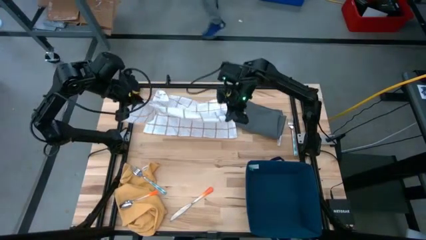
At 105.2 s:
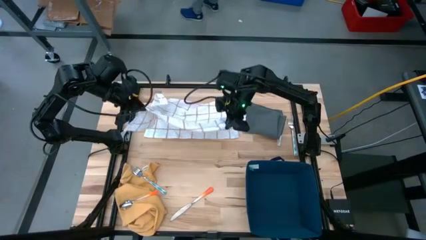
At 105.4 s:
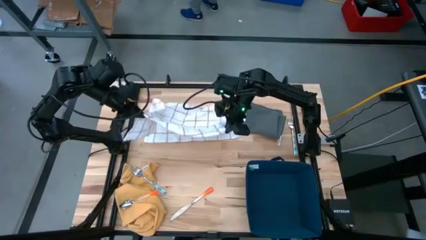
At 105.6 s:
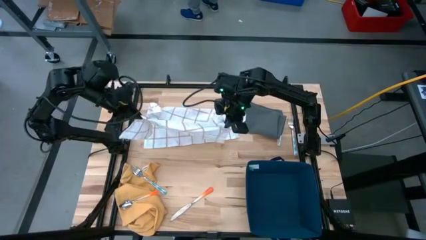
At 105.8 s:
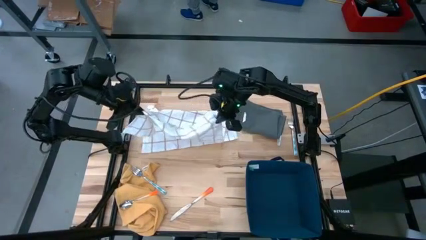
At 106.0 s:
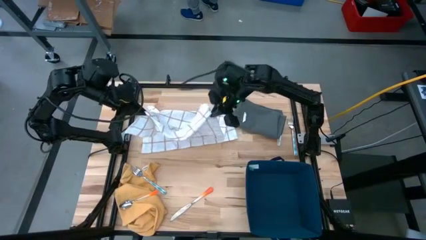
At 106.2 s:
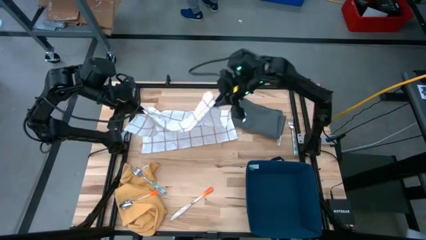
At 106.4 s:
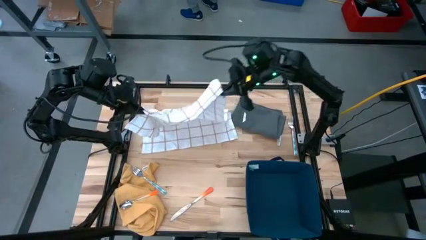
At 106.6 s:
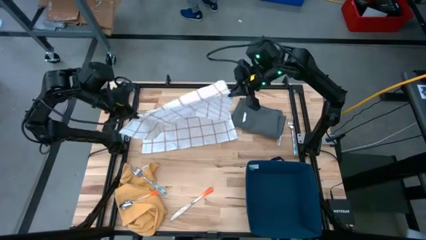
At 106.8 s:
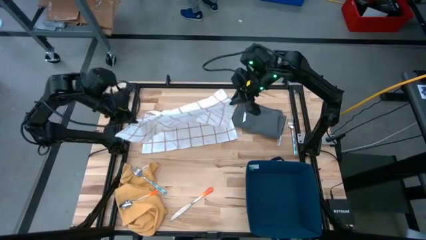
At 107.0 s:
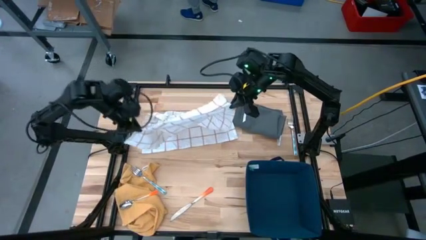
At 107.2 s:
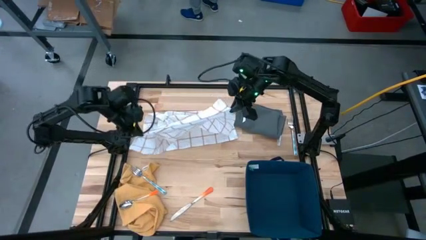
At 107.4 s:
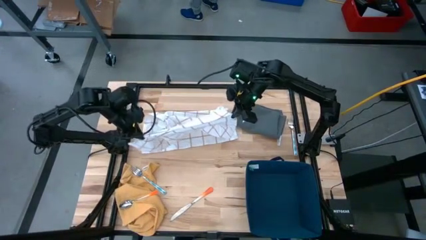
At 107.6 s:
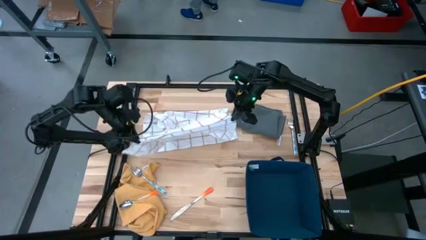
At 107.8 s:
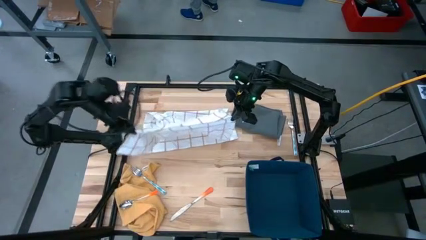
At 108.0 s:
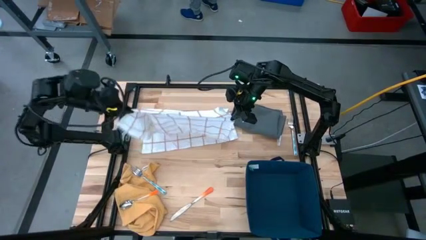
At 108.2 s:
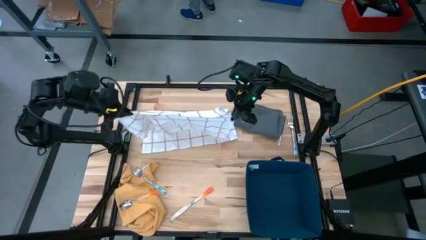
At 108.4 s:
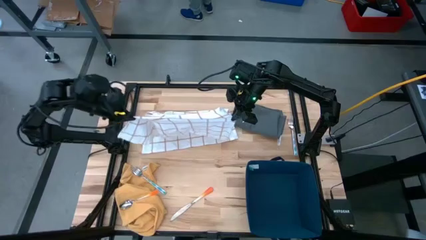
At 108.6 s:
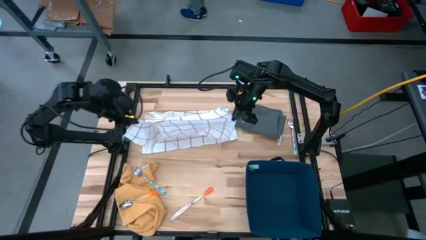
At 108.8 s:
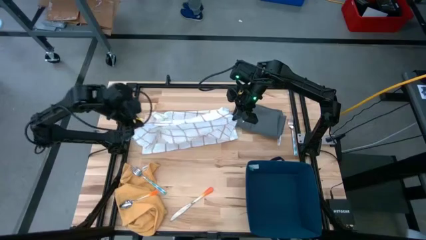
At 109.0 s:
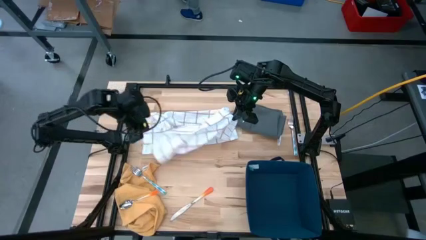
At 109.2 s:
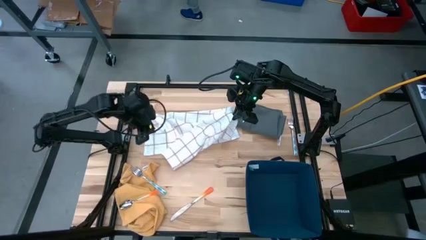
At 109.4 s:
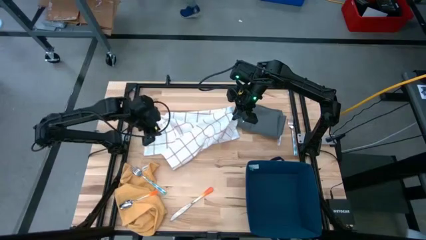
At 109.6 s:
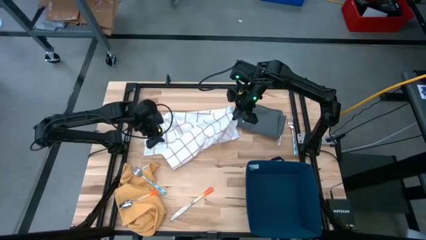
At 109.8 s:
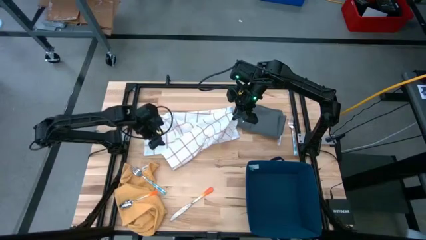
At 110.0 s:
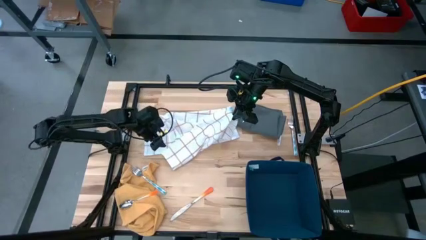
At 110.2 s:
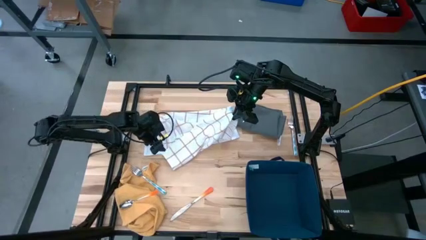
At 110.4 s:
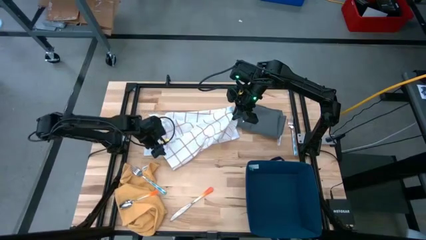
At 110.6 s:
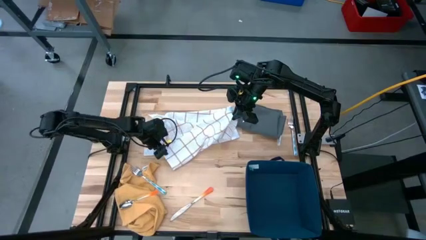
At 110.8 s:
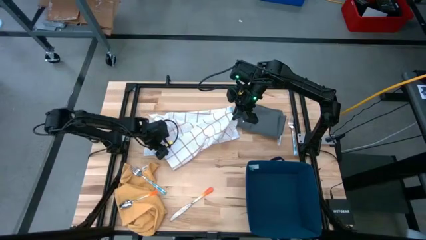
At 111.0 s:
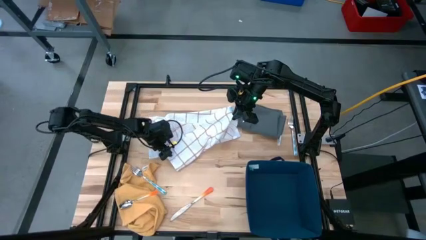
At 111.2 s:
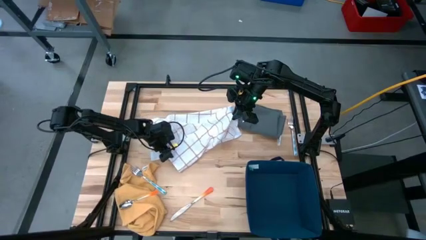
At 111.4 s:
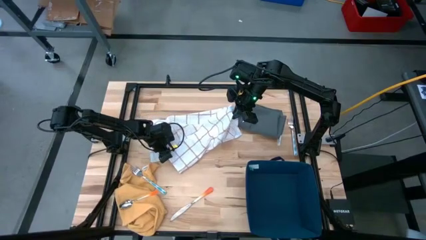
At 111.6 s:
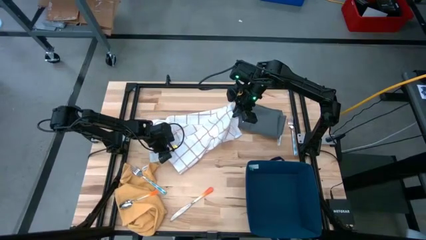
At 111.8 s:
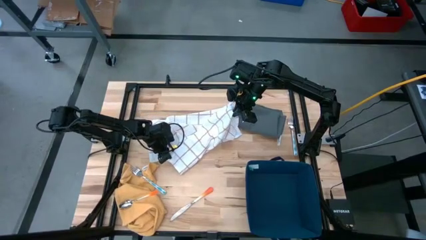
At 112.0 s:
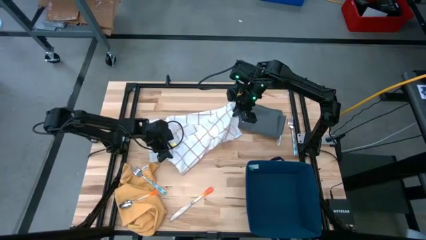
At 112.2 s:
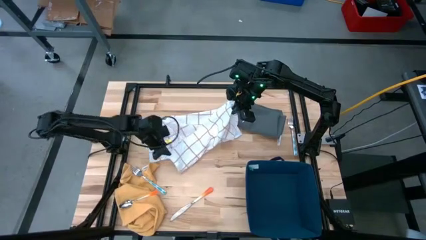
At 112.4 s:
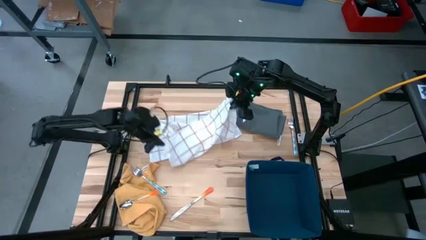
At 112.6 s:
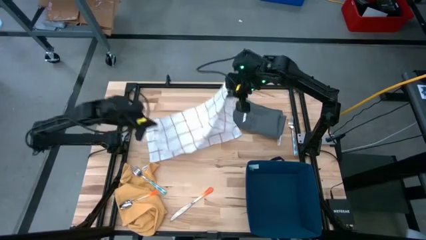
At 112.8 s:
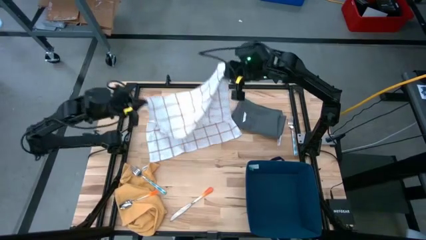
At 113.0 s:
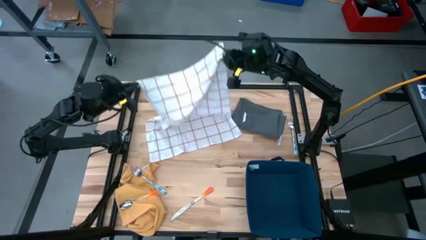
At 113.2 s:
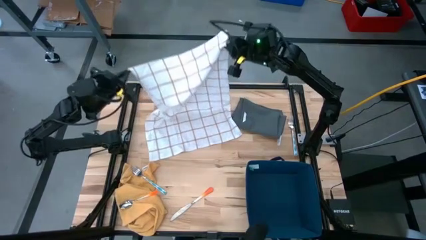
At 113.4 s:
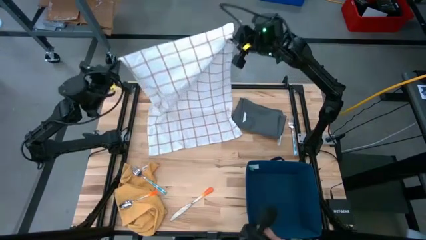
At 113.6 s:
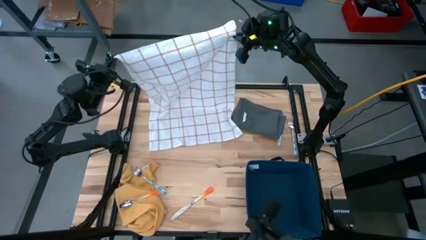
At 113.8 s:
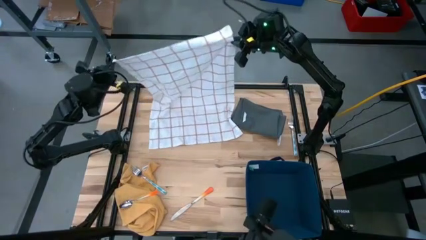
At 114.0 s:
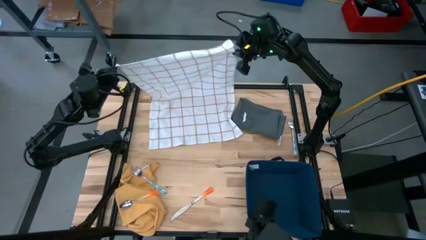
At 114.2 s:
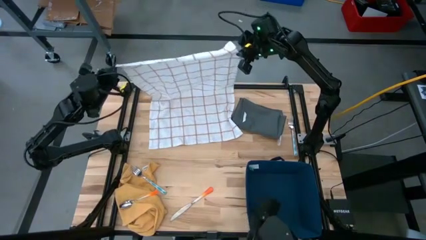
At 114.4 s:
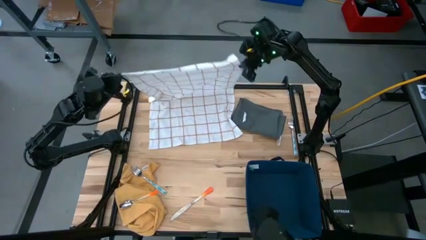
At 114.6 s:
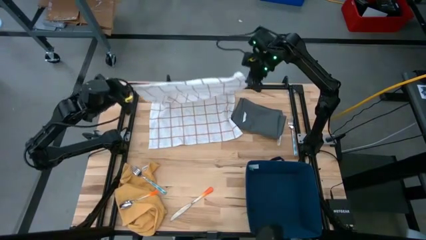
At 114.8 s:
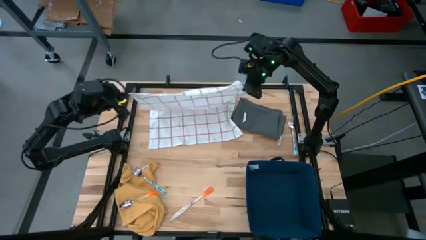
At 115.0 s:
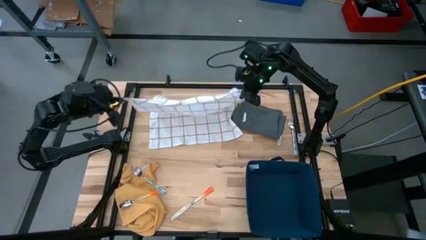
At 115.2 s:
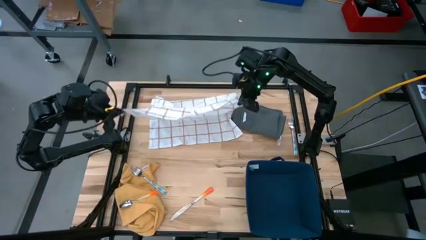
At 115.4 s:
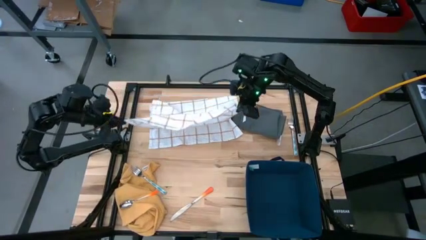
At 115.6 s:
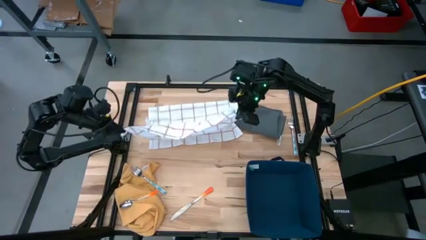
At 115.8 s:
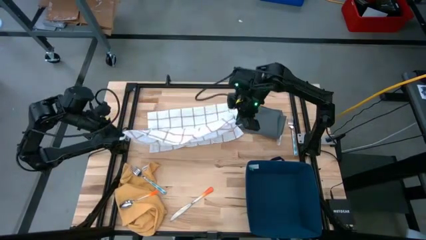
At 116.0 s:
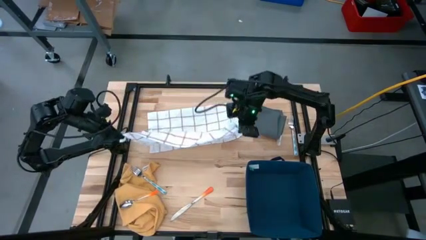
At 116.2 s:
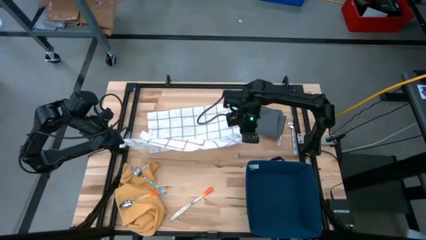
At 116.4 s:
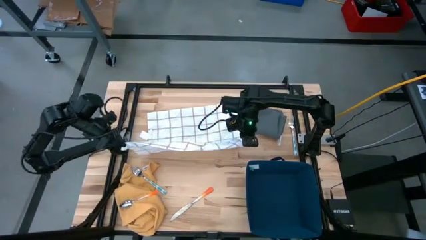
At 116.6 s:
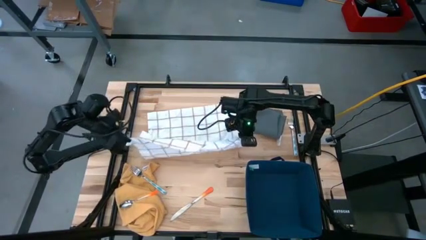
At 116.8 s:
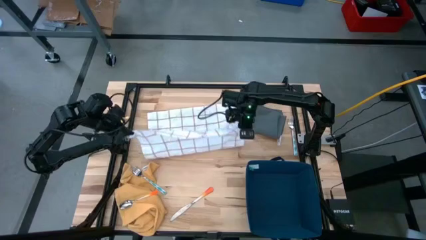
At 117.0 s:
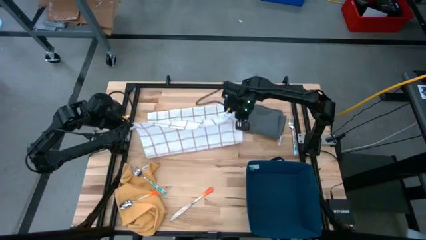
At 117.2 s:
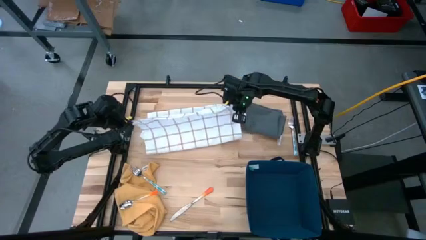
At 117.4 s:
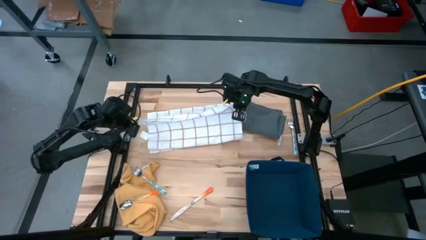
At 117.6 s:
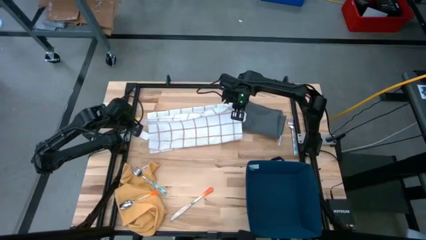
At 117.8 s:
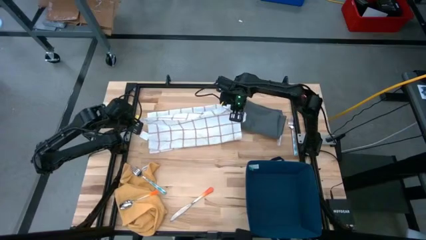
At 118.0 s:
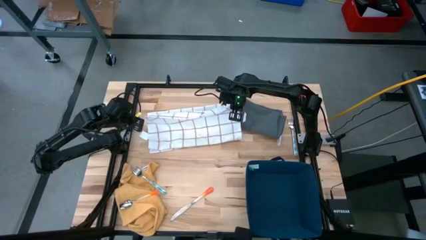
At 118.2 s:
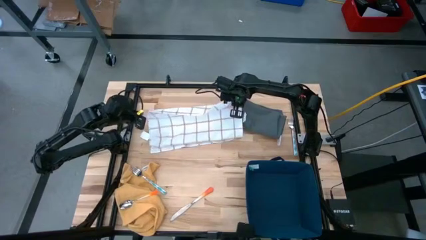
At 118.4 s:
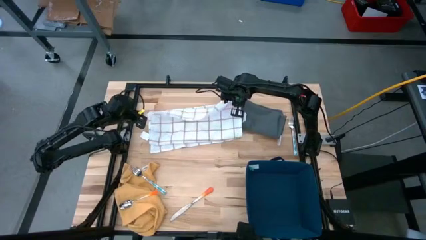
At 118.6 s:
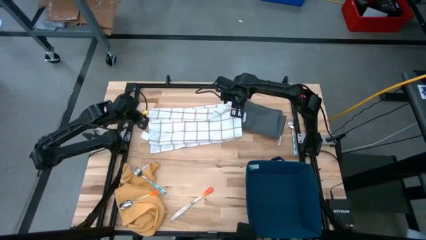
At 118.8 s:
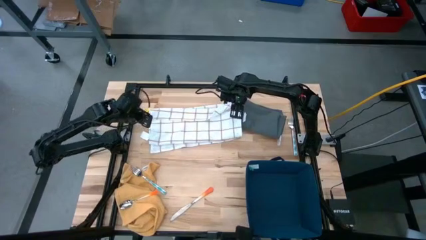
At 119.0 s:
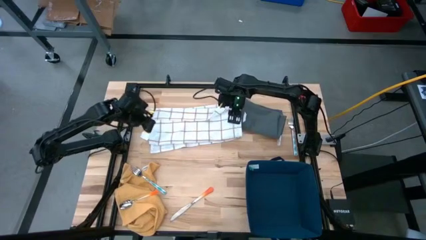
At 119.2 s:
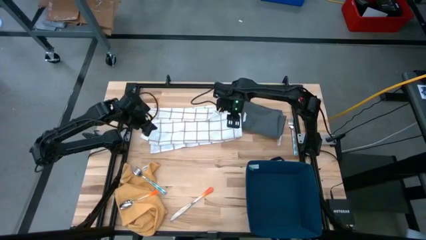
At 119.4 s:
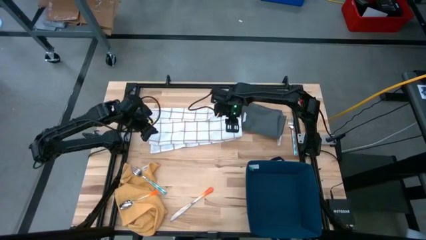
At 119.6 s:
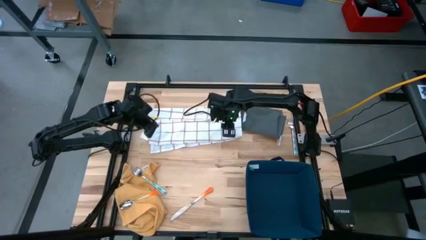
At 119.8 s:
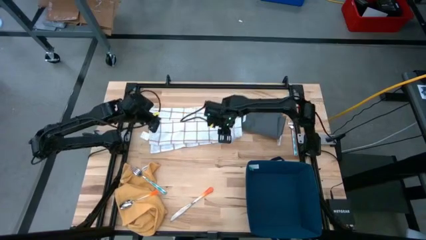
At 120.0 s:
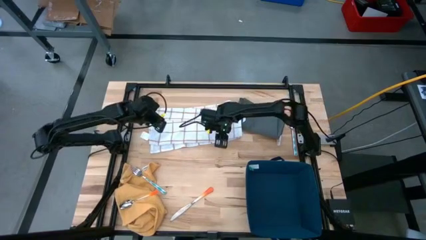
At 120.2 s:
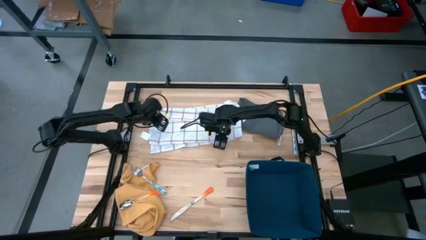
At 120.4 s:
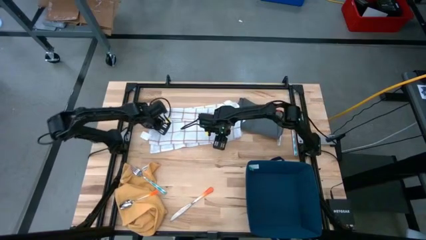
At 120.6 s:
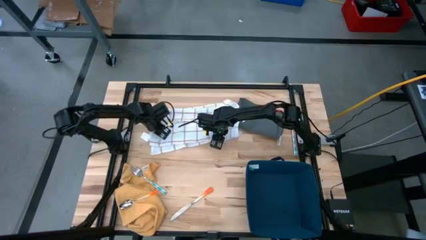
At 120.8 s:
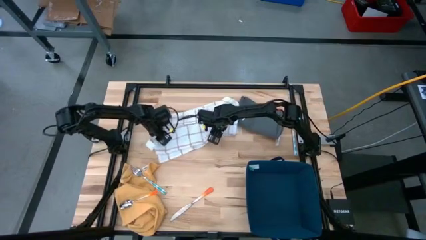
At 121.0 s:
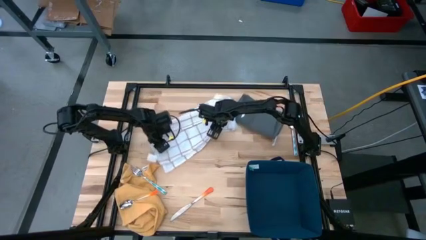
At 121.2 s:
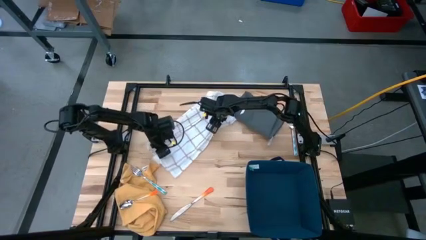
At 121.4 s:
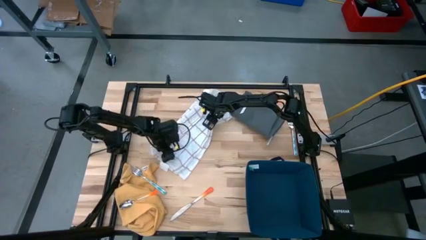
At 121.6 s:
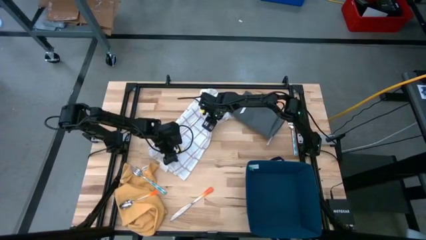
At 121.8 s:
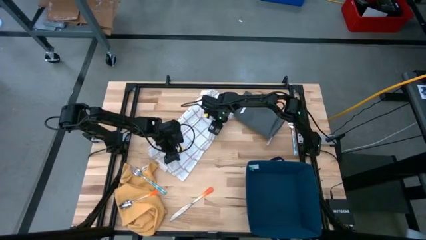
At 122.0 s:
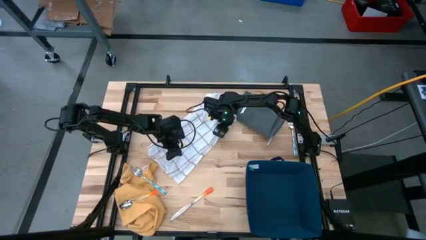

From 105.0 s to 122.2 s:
Task: Fold towel
Fold the white towel
